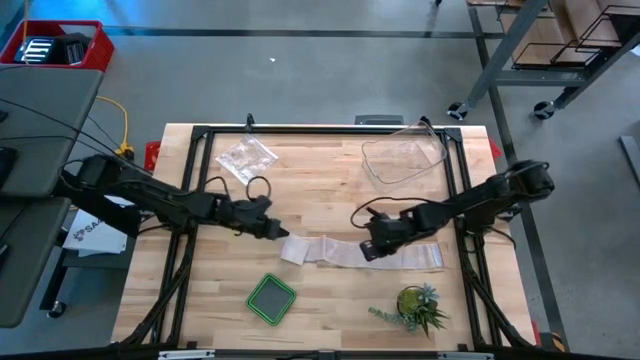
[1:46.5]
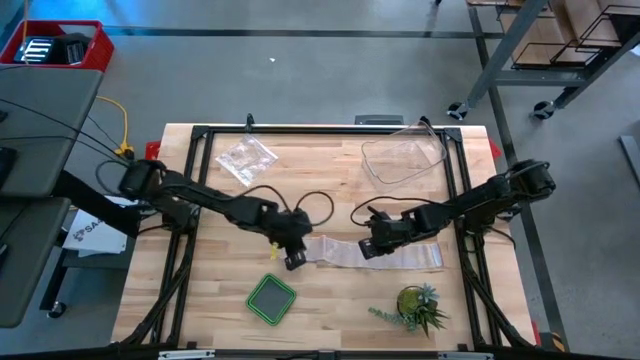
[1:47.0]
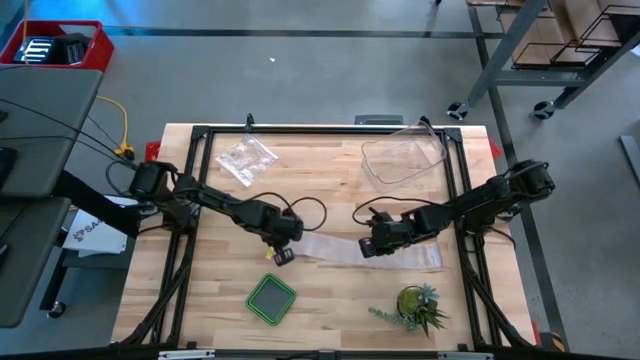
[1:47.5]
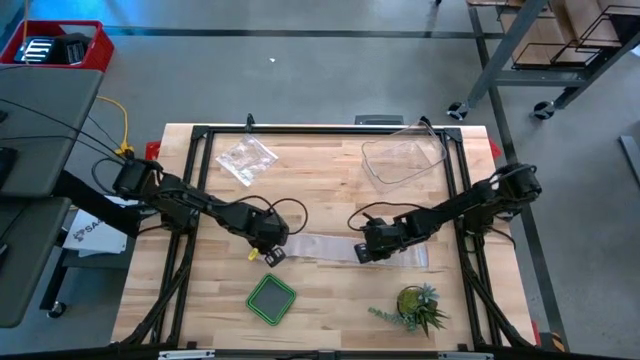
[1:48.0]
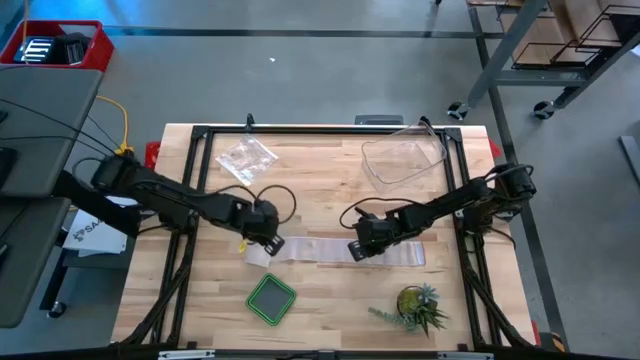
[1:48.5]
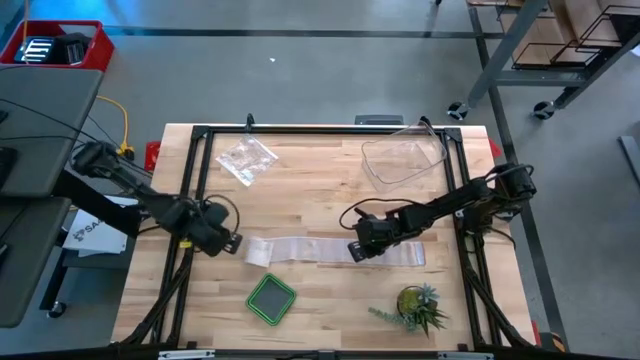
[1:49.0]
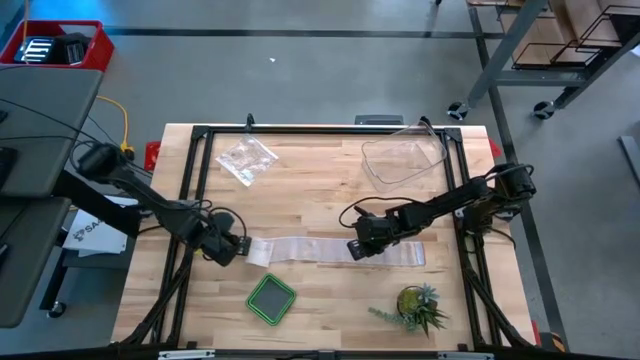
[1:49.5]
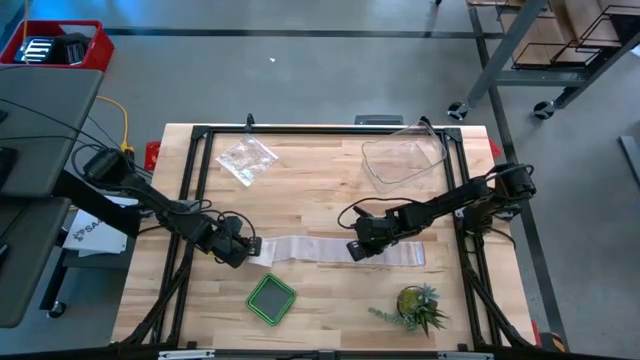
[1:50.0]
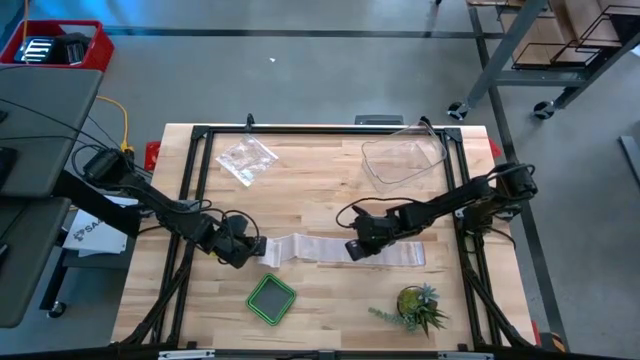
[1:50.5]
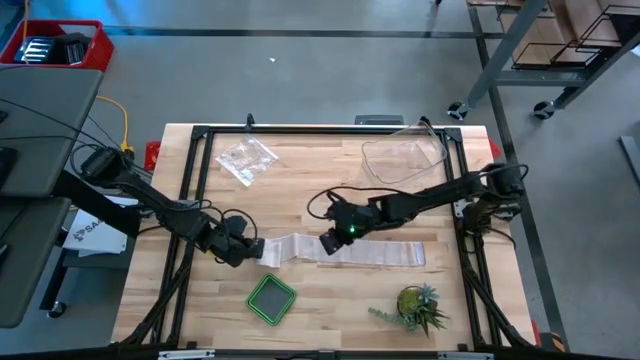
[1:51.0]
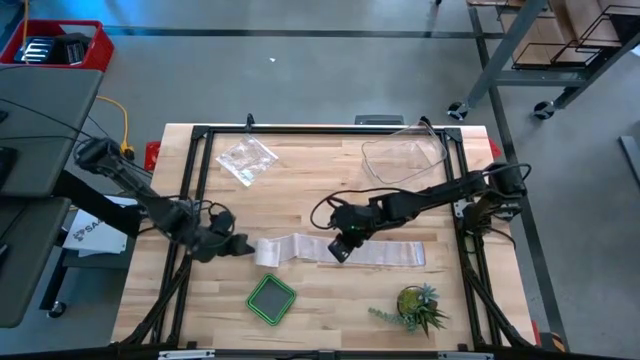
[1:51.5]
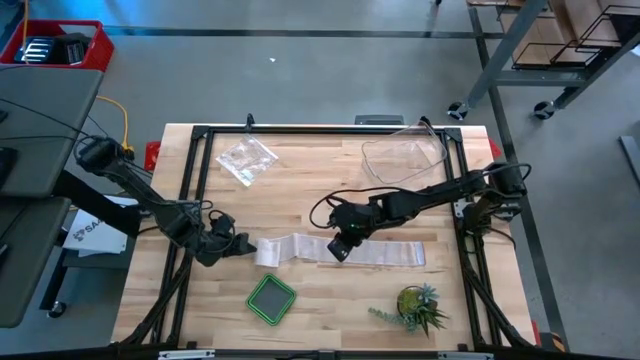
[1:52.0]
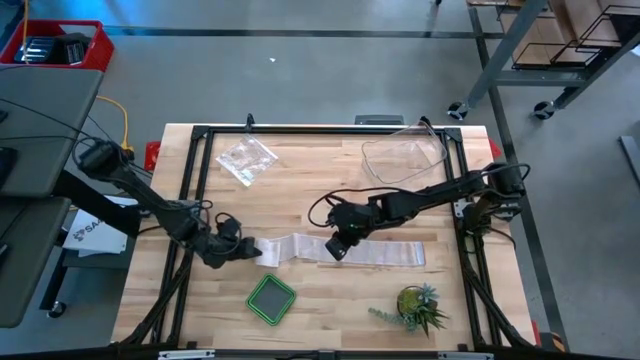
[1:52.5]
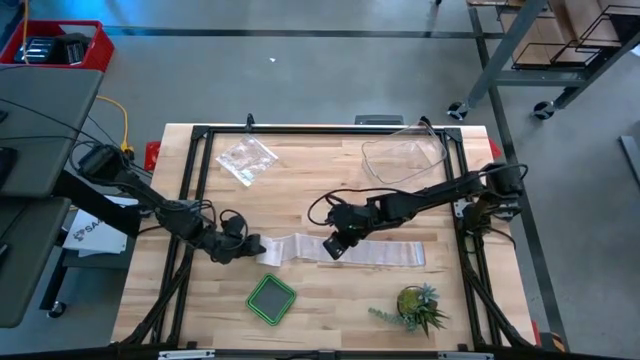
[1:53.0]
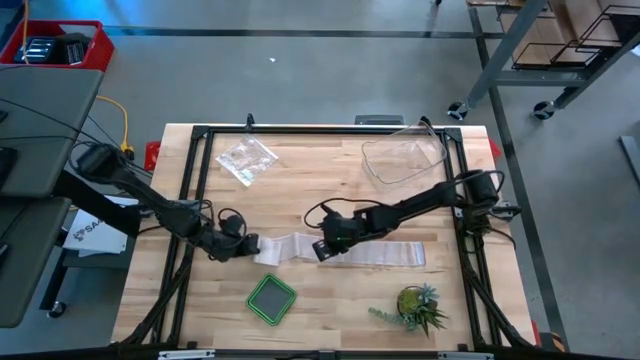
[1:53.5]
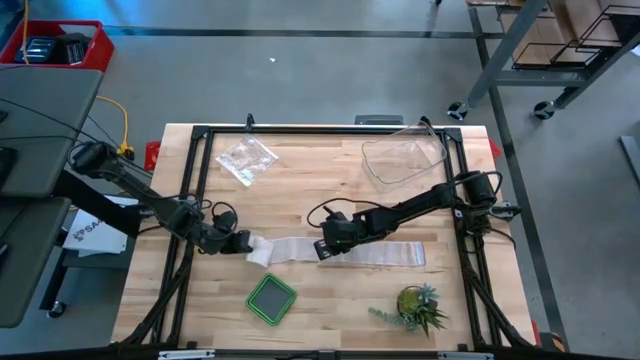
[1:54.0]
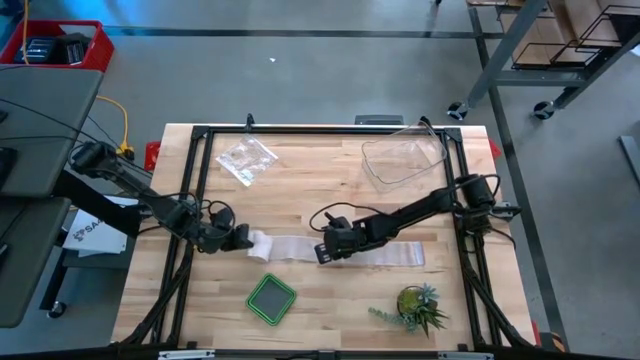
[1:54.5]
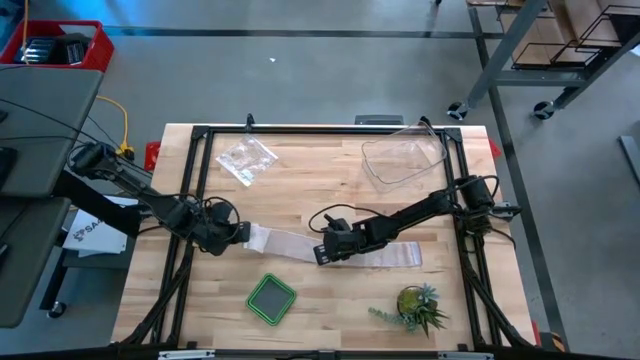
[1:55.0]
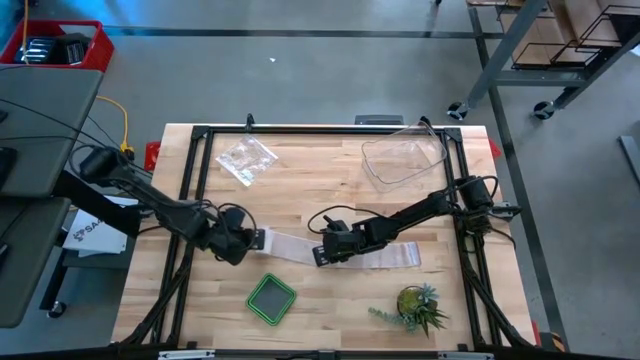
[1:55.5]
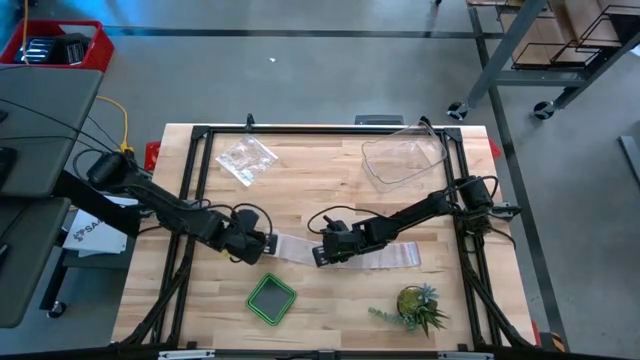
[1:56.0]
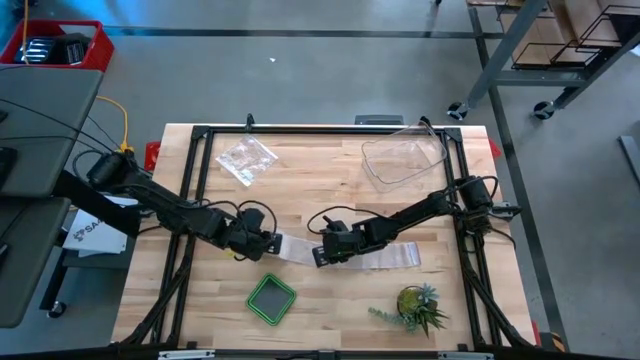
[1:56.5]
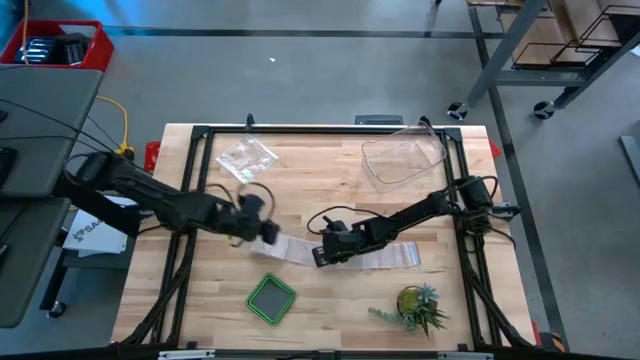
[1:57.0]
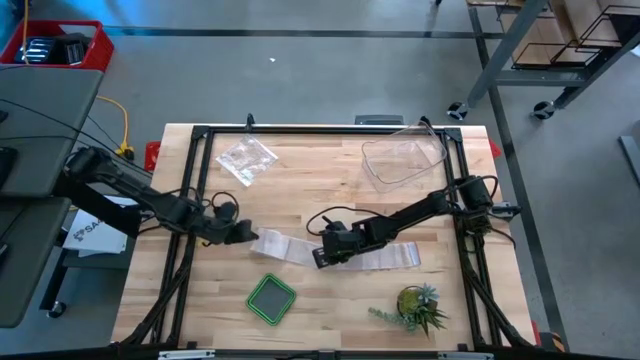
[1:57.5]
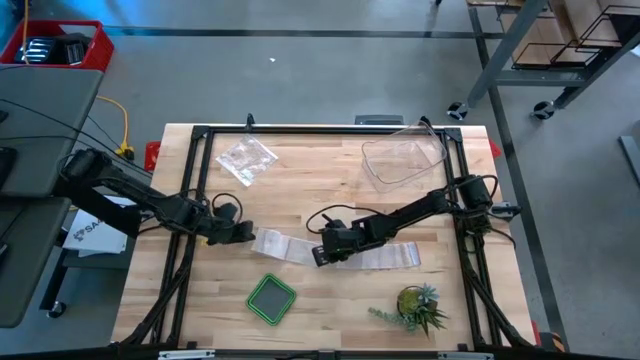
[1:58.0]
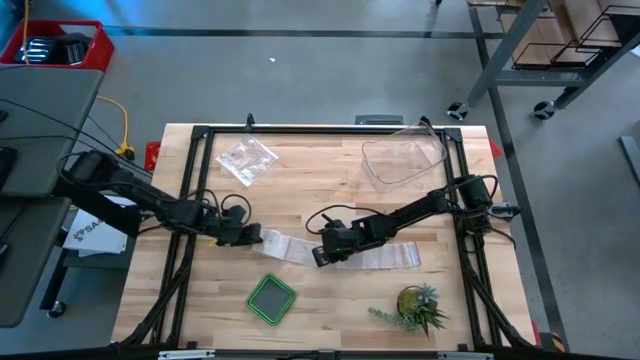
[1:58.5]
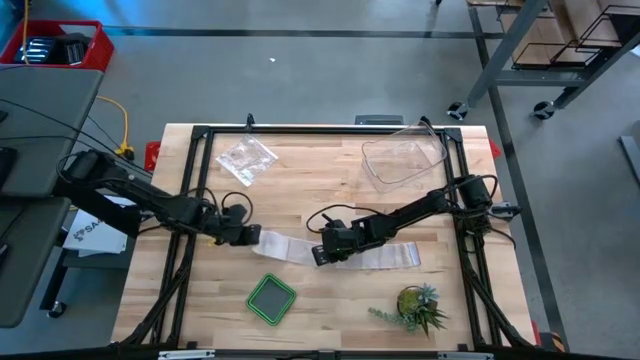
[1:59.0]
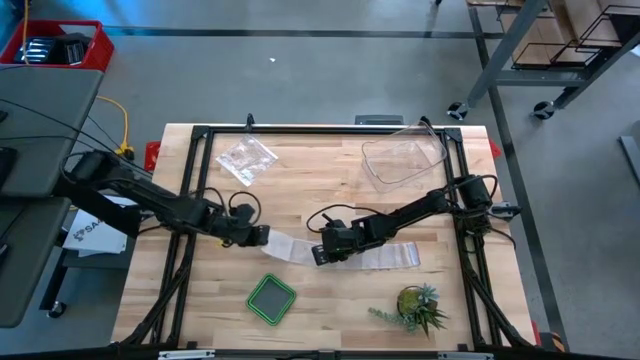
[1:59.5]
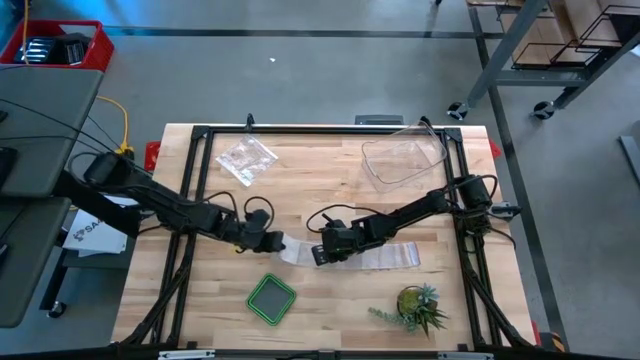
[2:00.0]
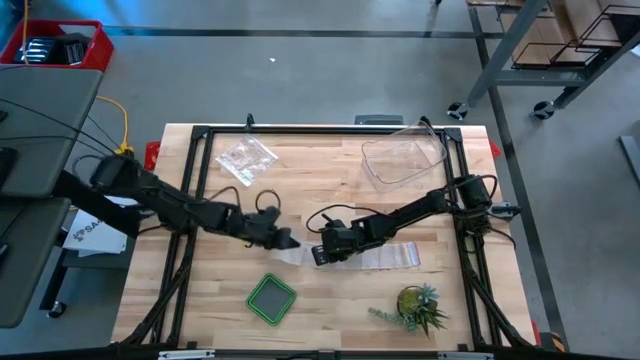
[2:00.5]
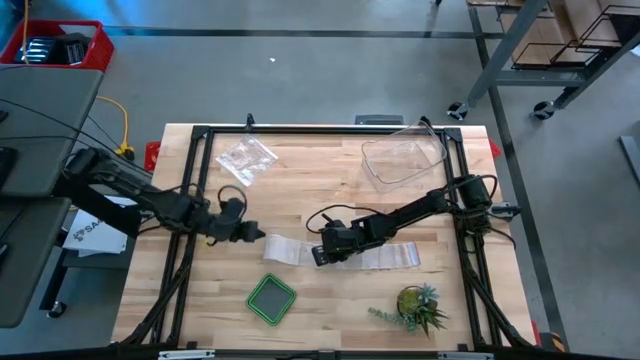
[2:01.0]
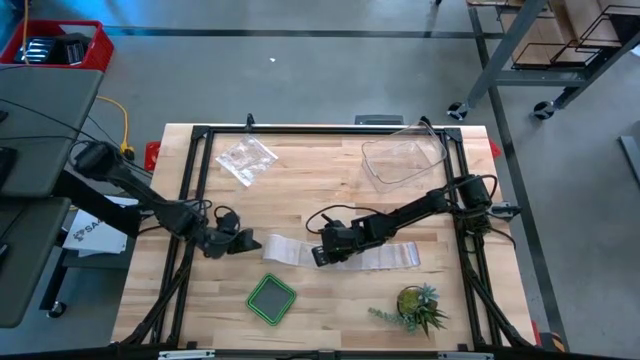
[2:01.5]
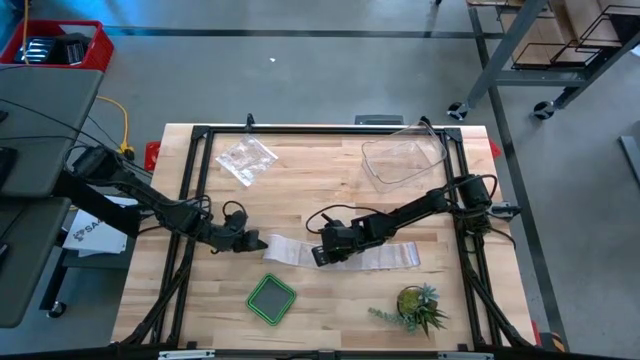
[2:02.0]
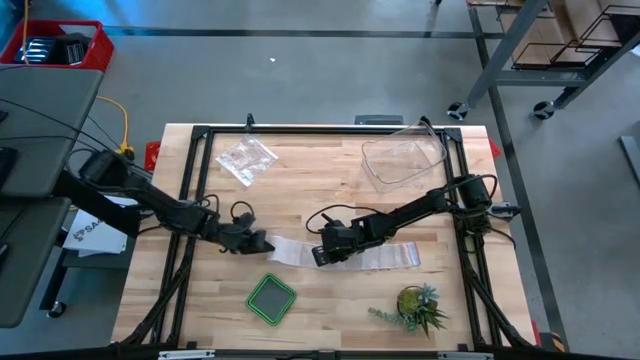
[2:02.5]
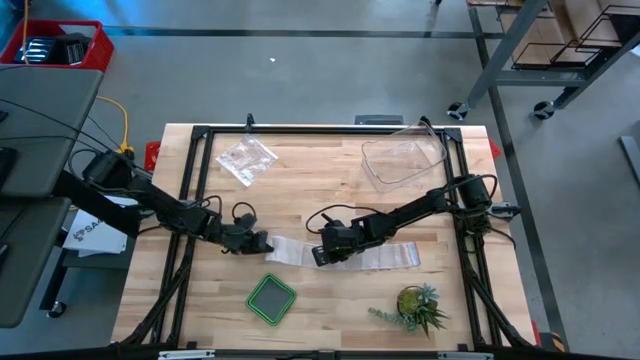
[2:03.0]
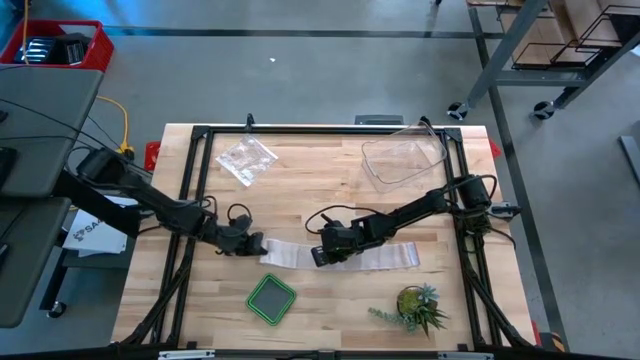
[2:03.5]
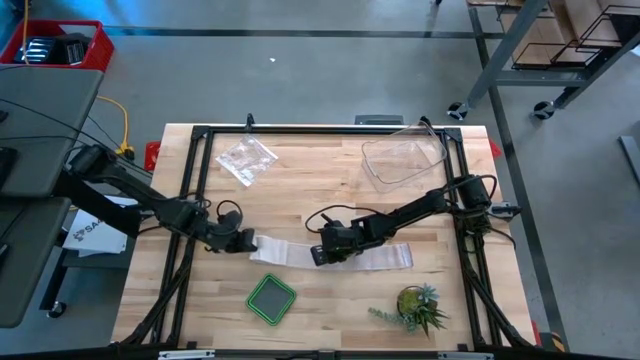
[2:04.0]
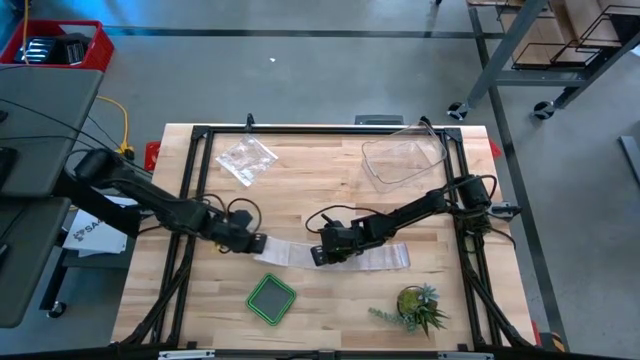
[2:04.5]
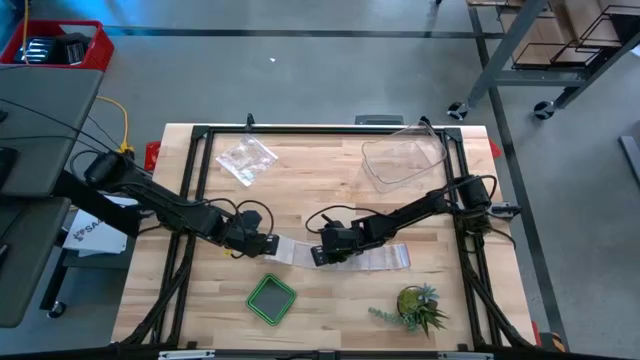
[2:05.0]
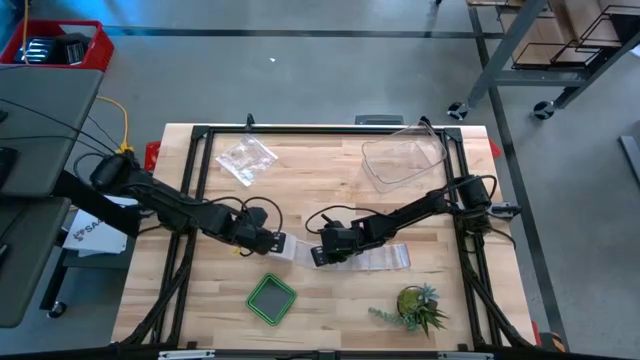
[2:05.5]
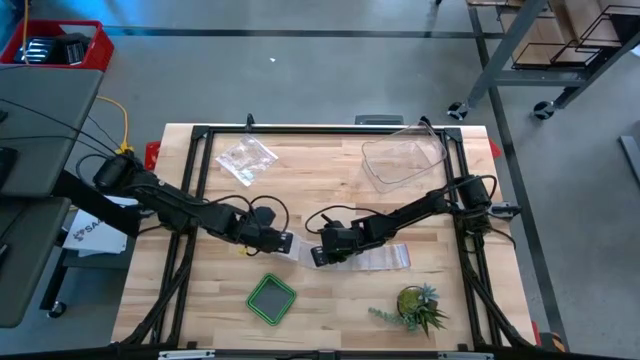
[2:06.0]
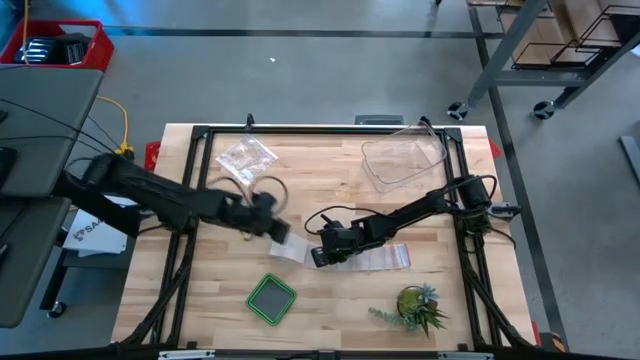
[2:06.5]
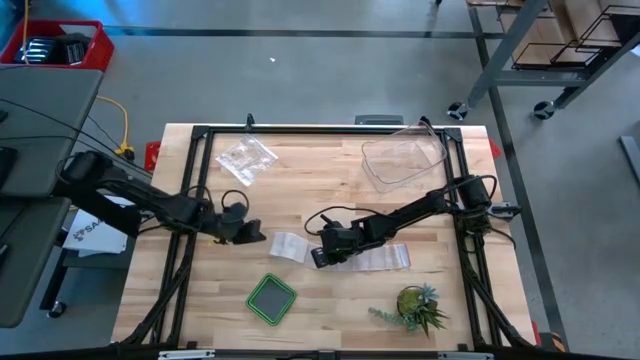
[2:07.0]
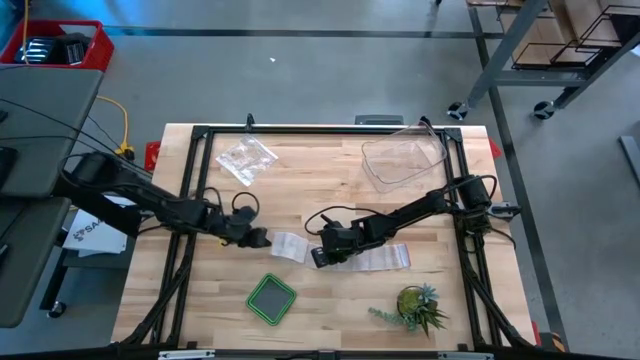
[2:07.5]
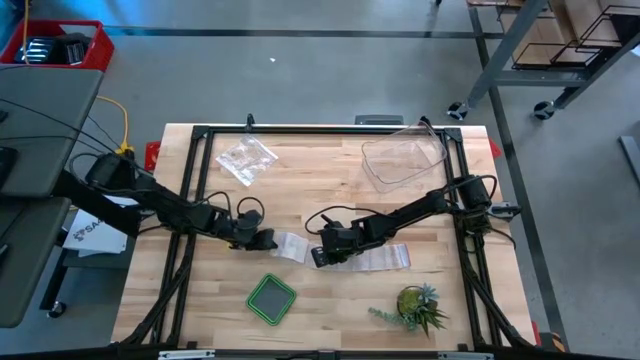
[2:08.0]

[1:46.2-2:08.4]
Task: Roll bandage
Roll the white bandage
